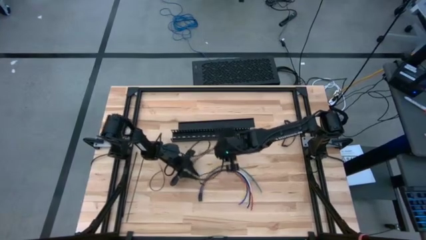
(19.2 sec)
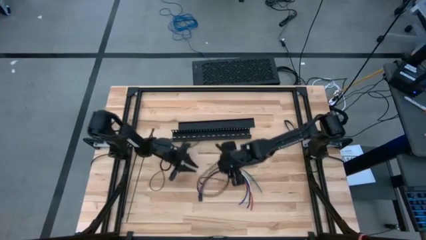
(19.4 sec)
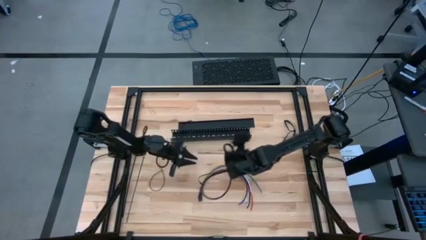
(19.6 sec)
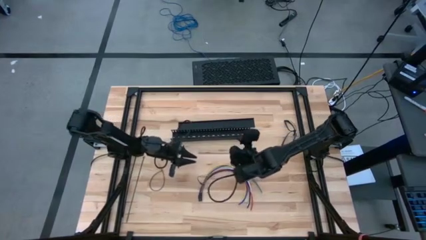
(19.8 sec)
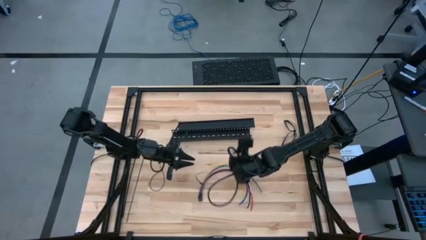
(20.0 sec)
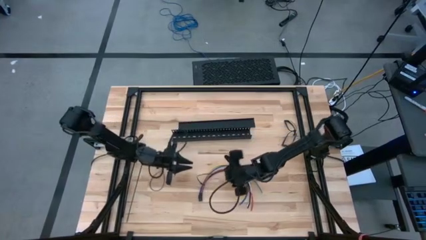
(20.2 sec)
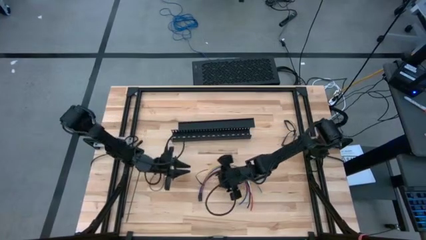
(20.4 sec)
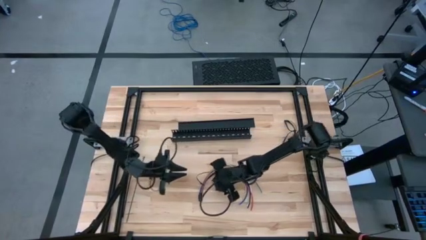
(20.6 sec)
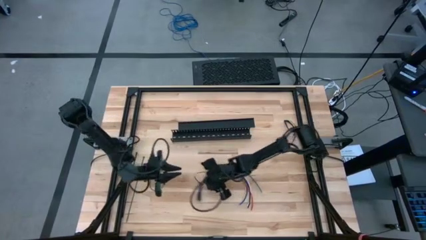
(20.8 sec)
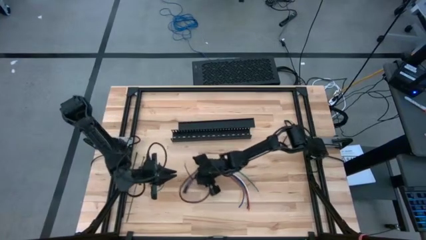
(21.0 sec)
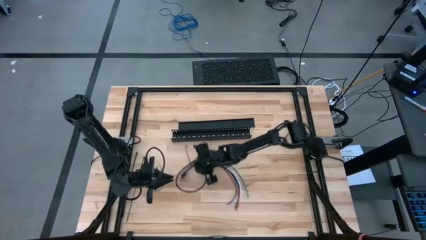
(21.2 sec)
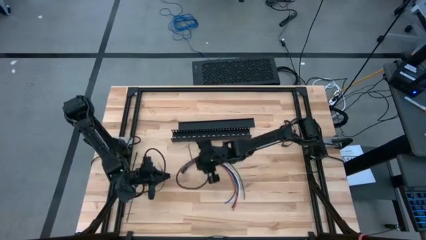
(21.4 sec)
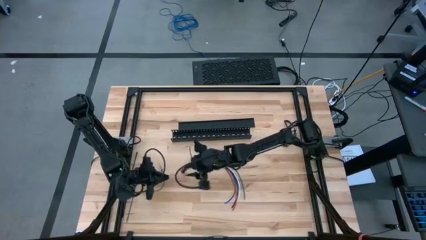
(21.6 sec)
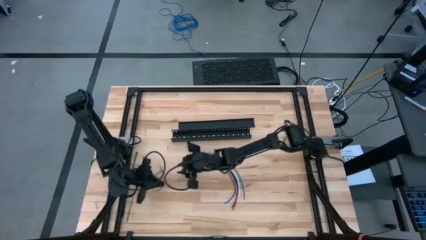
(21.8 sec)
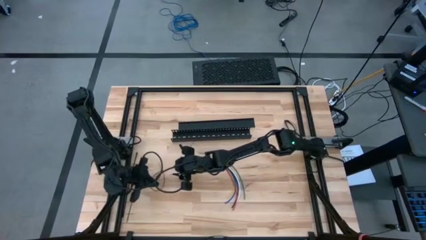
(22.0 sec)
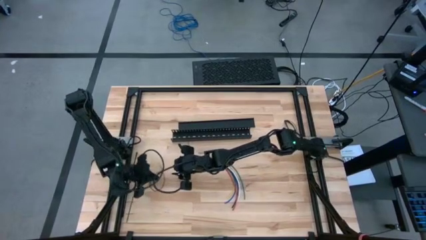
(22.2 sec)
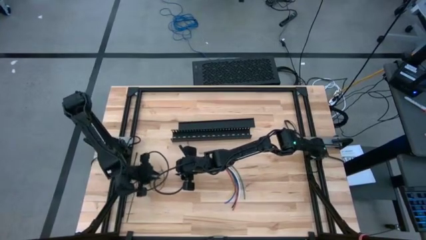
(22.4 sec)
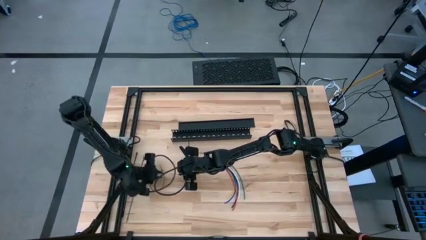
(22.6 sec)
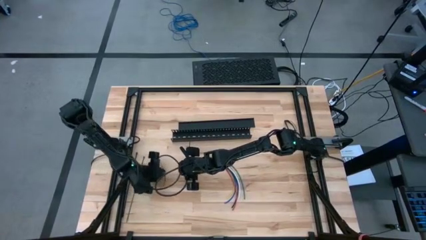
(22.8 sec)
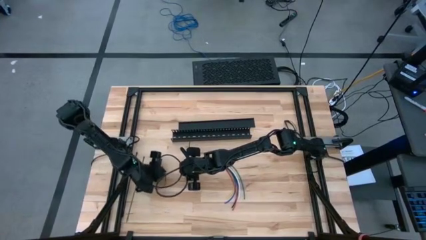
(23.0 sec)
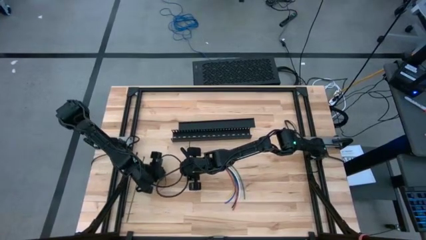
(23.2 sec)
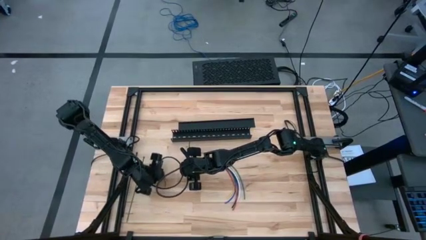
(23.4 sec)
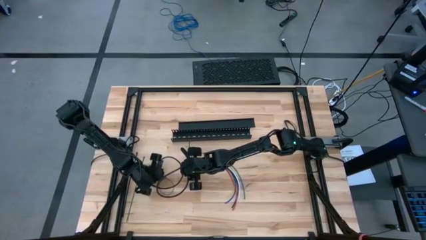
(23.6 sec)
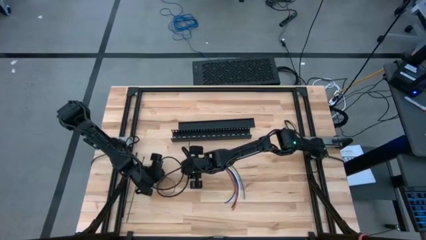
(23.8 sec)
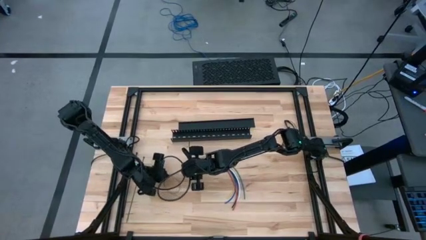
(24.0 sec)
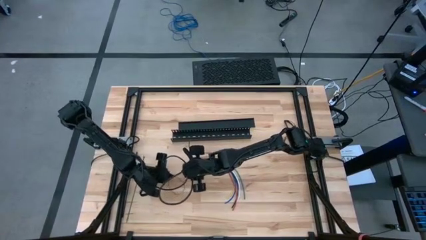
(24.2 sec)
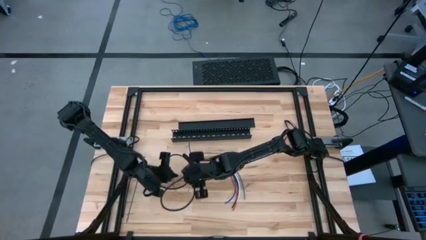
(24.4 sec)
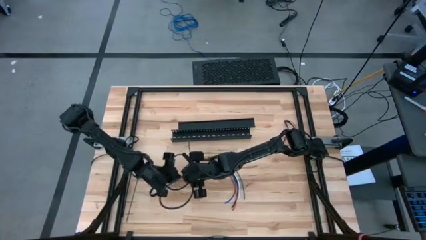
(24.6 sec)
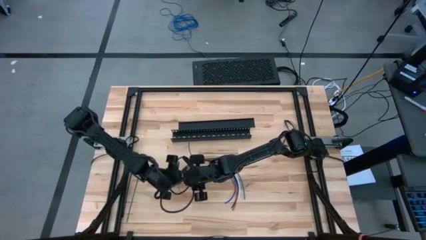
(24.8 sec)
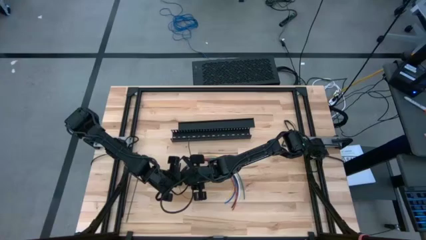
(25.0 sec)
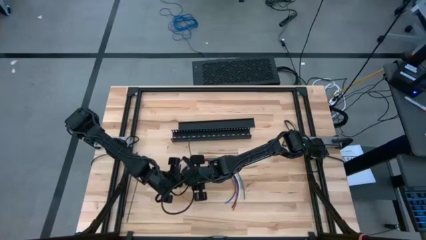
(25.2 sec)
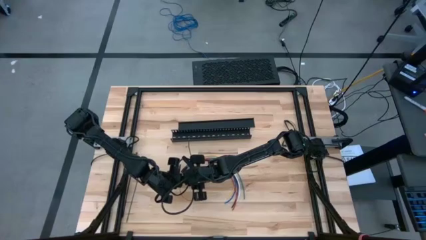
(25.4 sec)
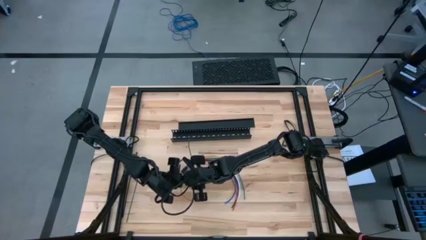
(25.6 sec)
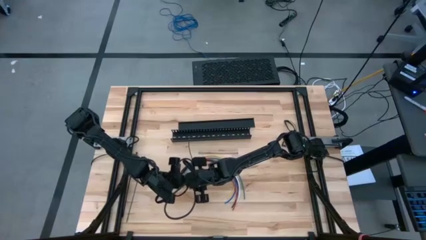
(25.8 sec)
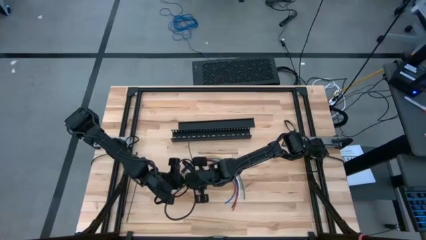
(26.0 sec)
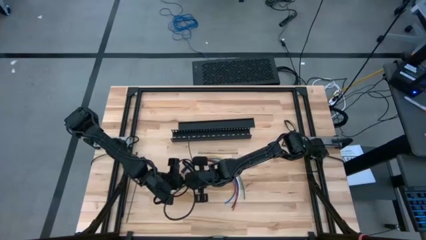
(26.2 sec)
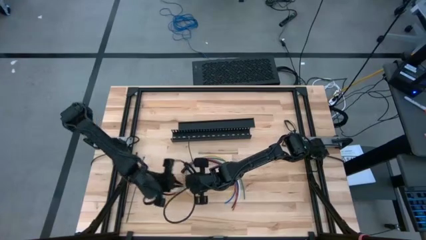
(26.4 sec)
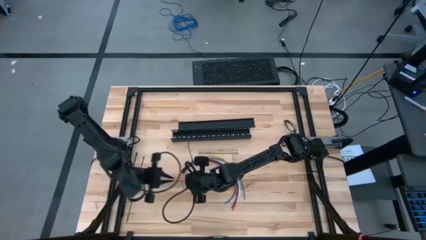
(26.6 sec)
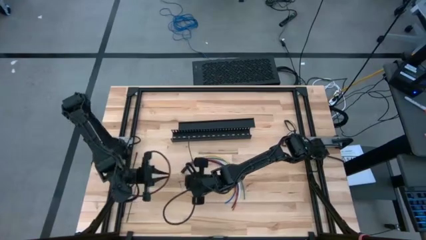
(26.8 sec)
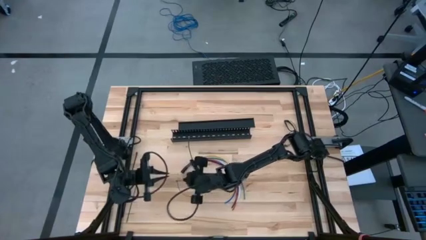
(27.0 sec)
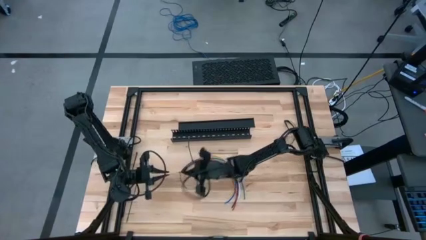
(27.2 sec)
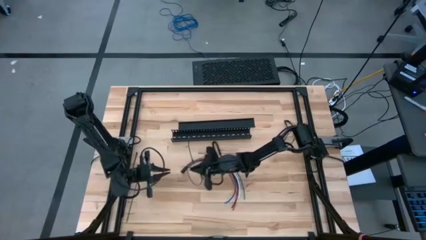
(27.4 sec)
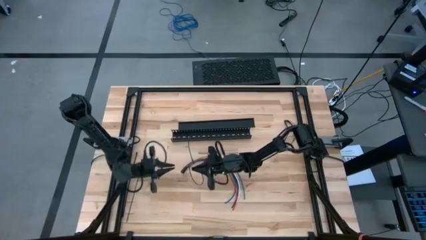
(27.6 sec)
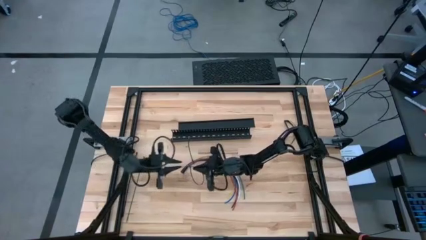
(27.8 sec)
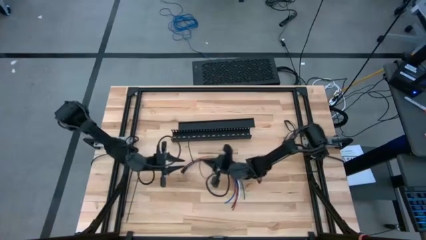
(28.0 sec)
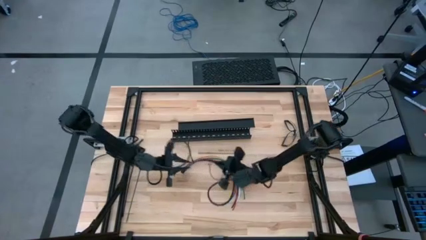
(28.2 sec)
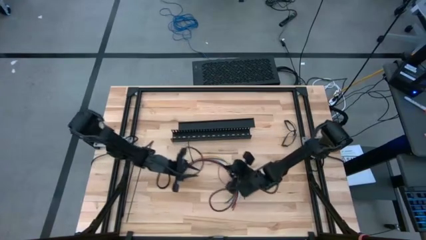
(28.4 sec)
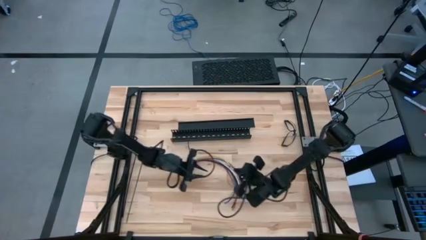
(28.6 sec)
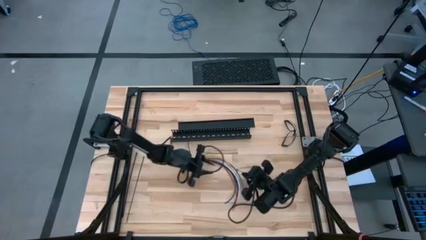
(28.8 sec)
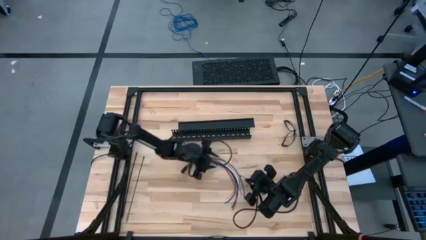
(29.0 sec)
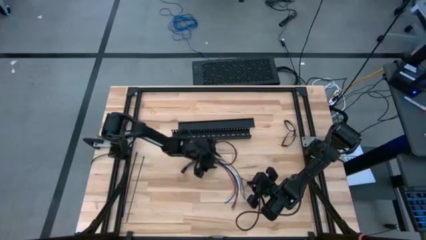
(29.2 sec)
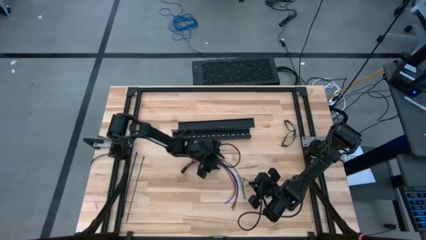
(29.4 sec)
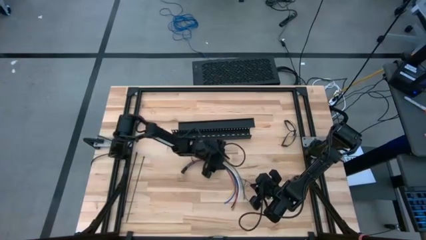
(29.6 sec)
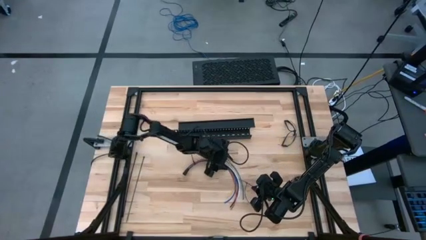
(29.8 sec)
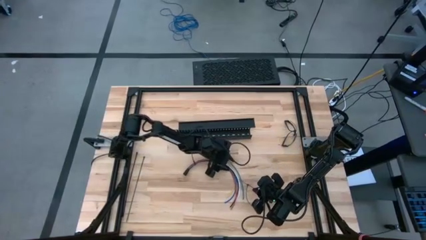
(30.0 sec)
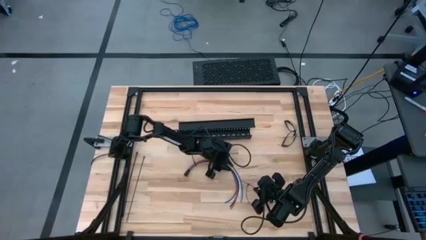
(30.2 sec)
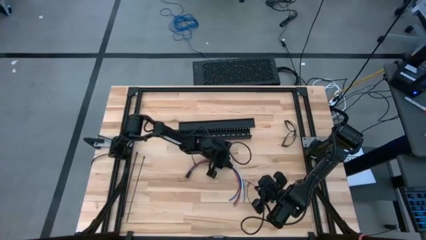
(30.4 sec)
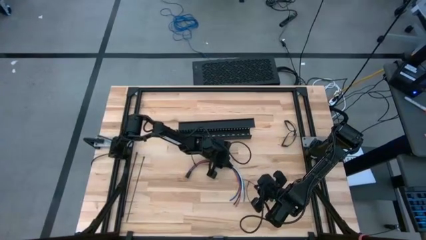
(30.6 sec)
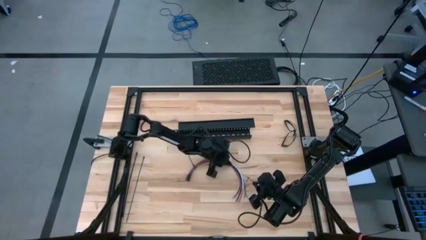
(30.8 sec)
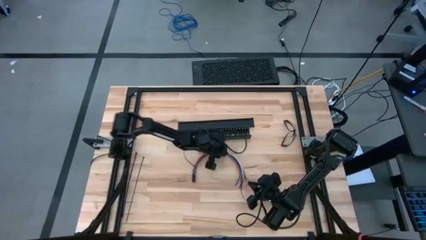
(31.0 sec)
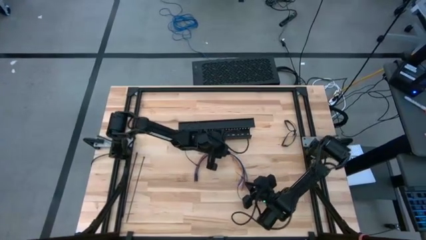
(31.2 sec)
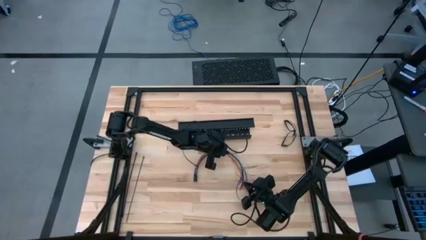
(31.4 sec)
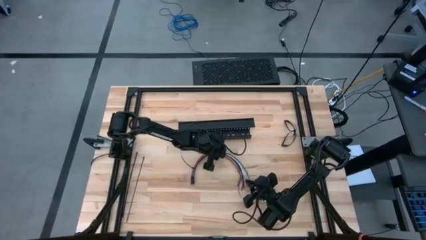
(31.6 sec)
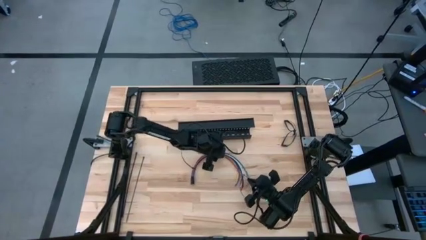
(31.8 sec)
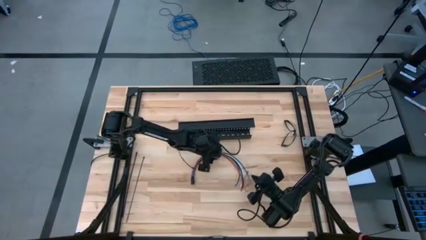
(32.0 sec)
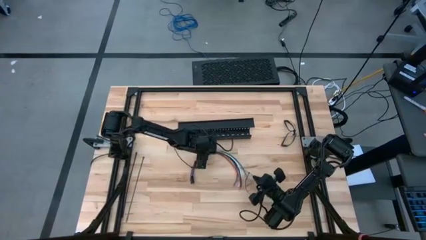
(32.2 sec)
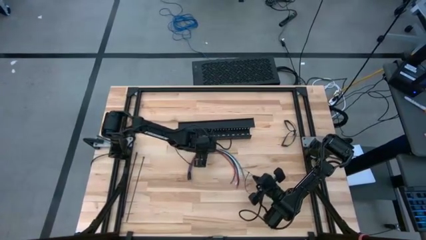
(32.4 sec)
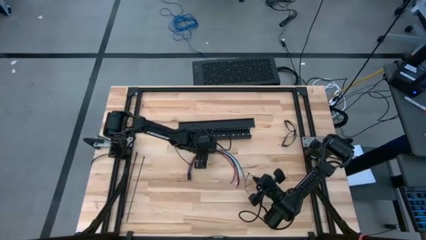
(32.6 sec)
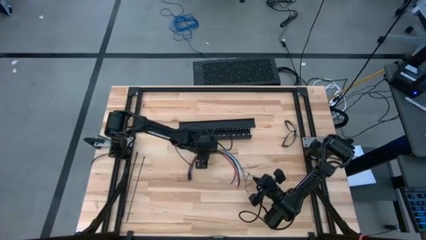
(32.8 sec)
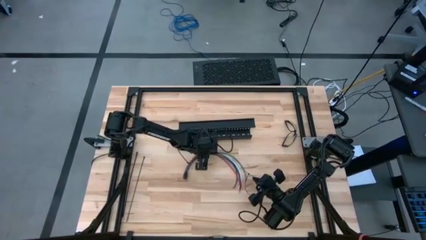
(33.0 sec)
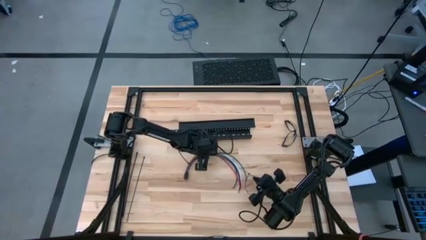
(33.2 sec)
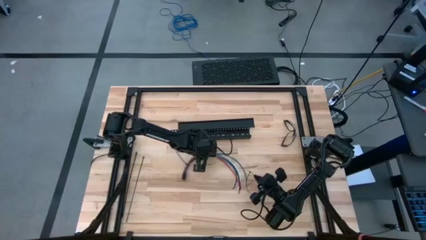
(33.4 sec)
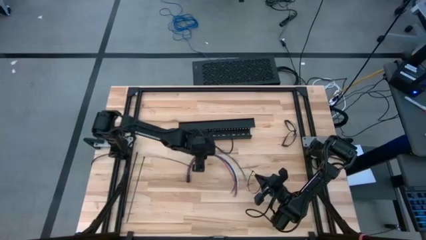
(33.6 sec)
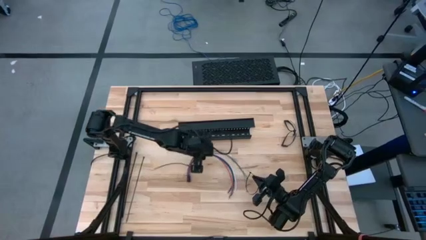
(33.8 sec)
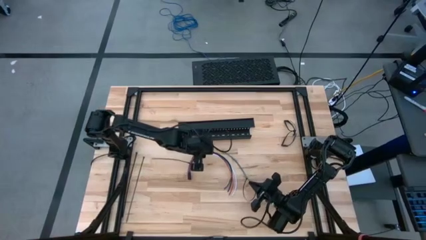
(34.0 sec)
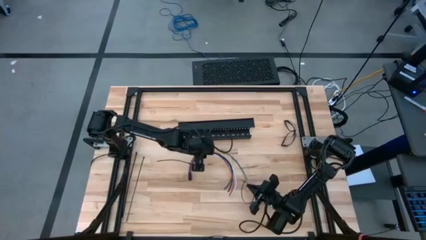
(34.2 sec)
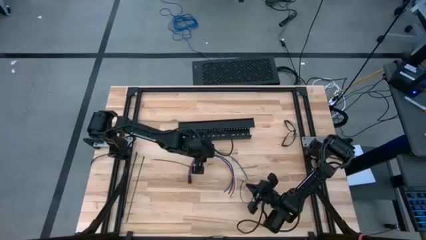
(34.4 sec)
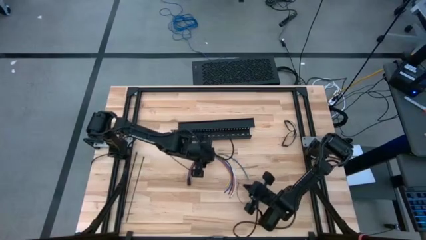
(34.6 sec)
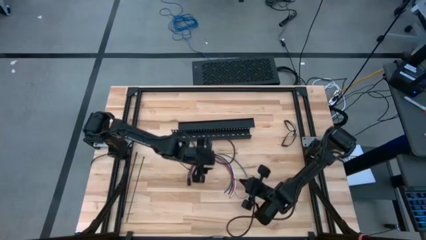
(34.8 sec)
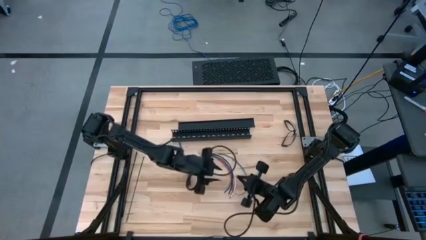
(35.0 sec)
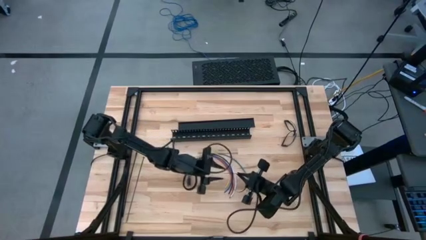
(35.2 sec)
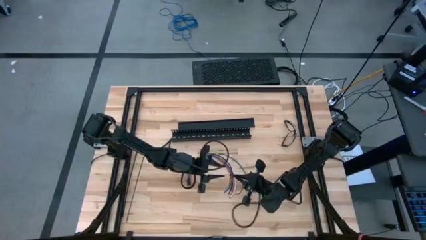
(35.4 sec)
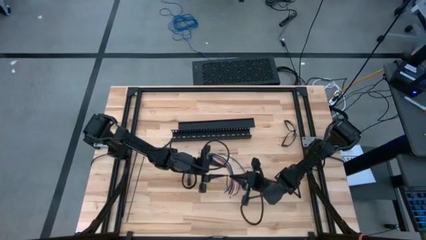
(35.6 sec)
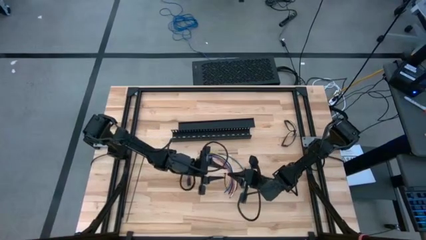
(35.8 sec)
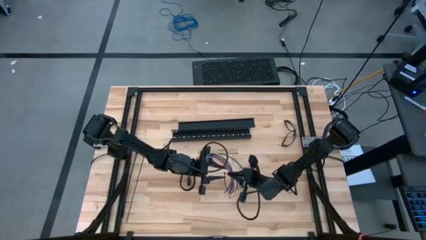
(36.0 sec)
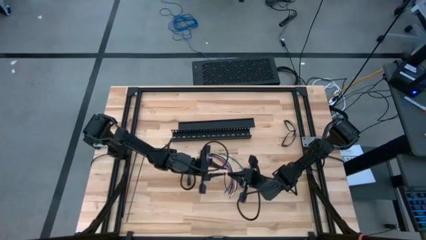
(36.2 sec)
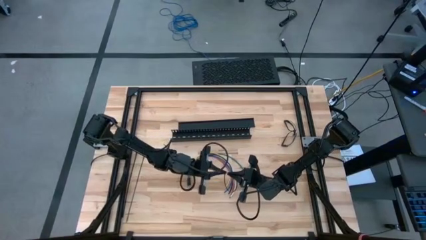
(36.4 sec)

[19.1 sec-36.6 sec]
Task: Ziptie cables
Wrap the cable wire using a zip tie
